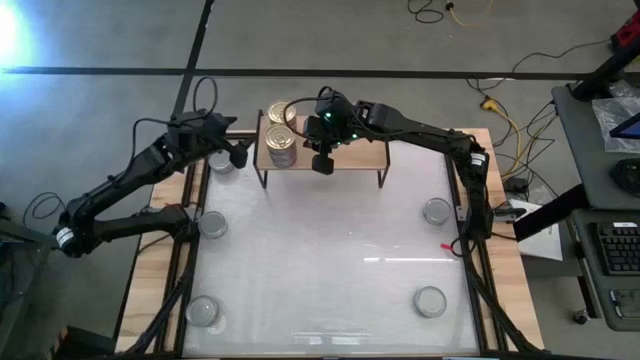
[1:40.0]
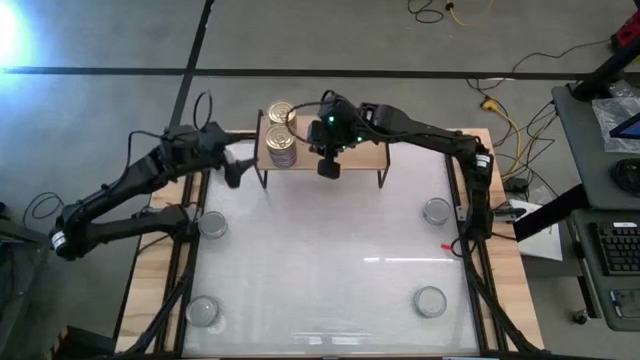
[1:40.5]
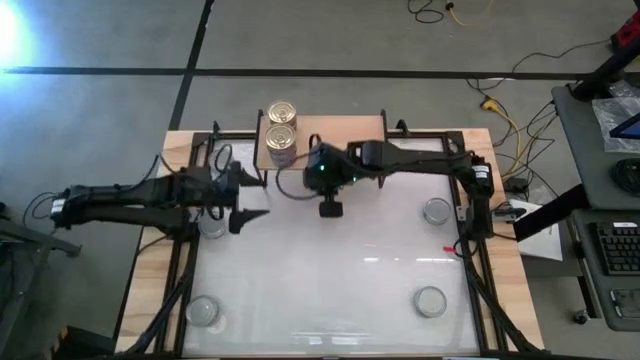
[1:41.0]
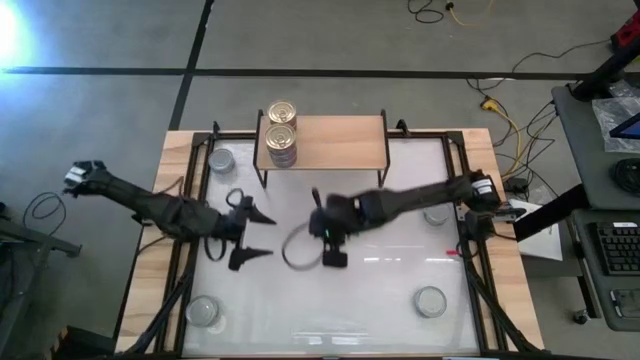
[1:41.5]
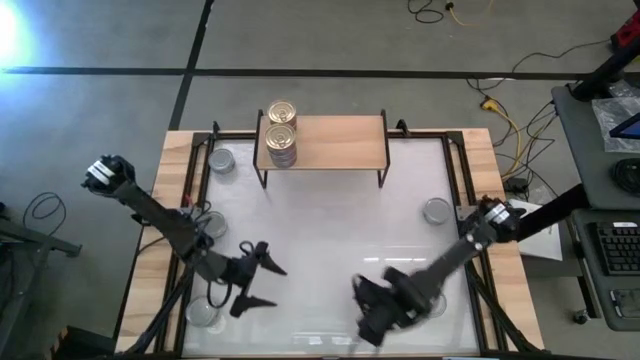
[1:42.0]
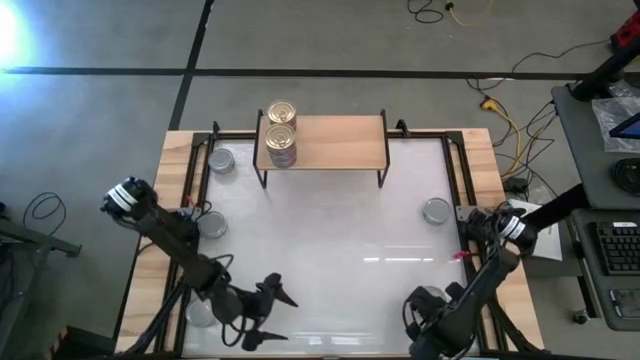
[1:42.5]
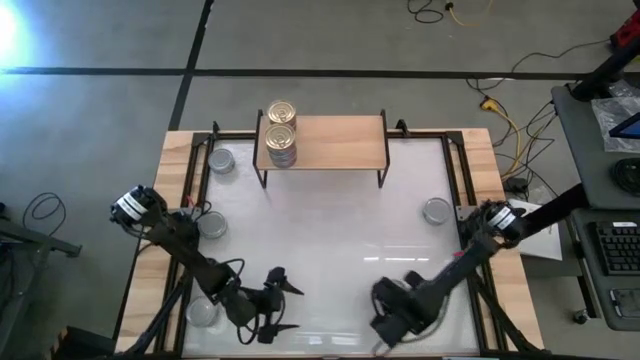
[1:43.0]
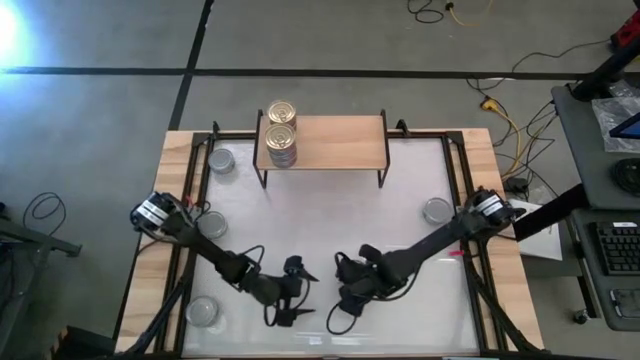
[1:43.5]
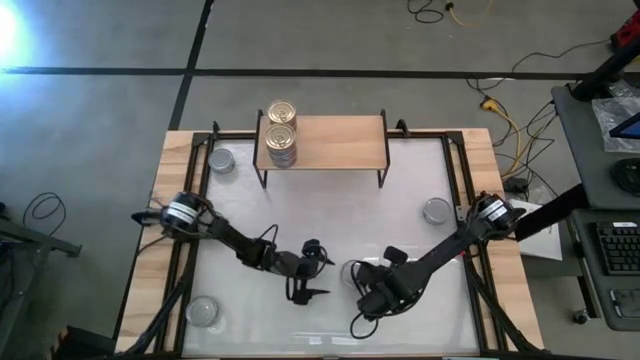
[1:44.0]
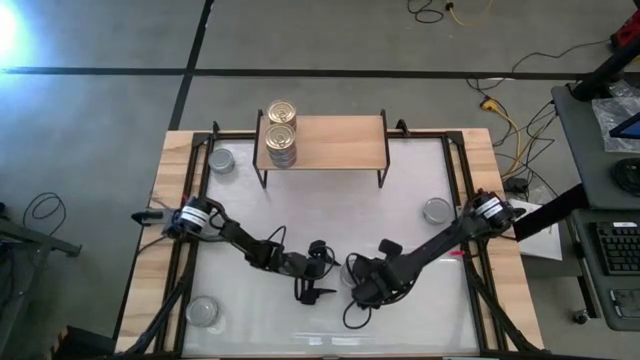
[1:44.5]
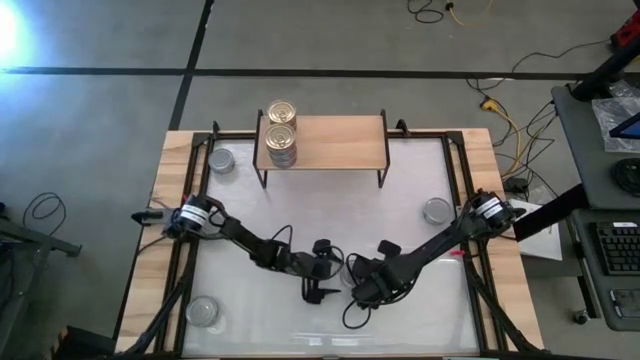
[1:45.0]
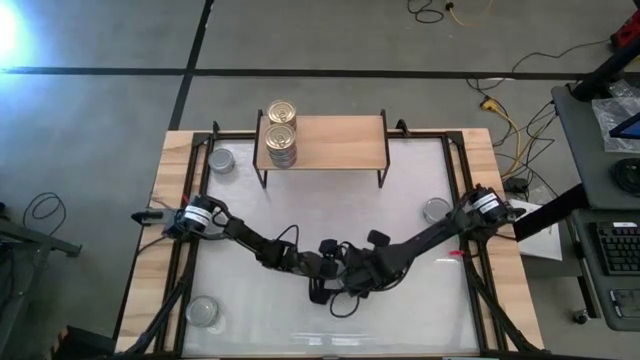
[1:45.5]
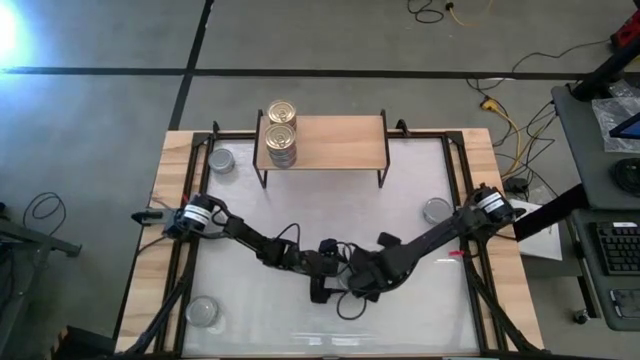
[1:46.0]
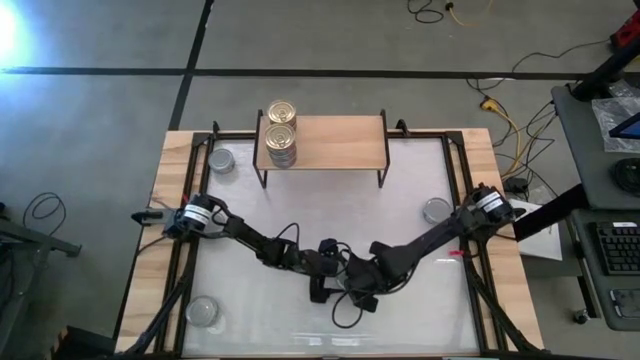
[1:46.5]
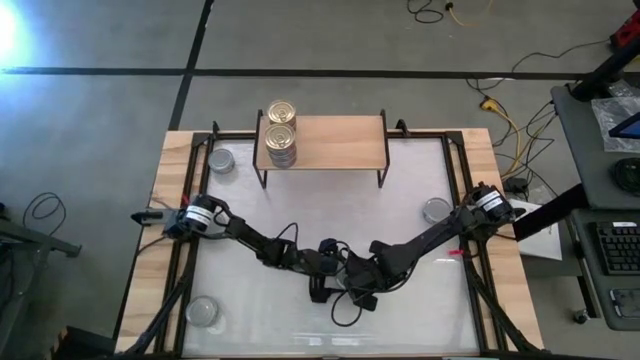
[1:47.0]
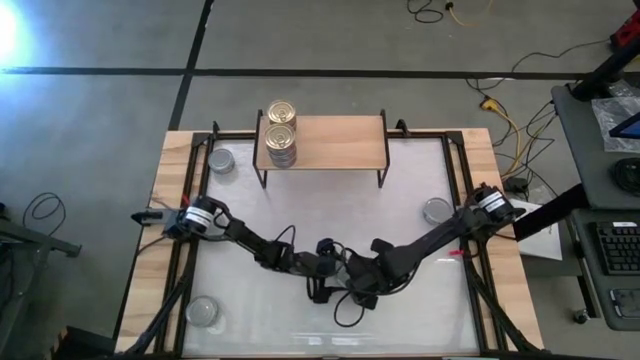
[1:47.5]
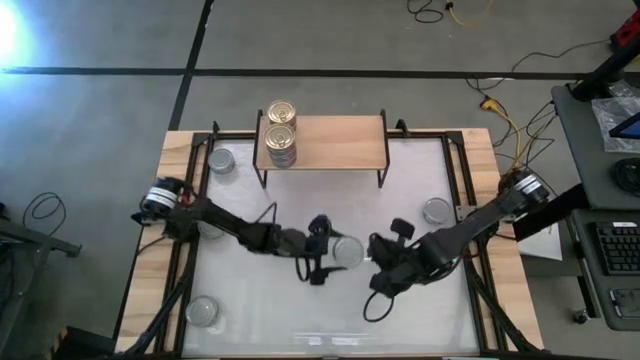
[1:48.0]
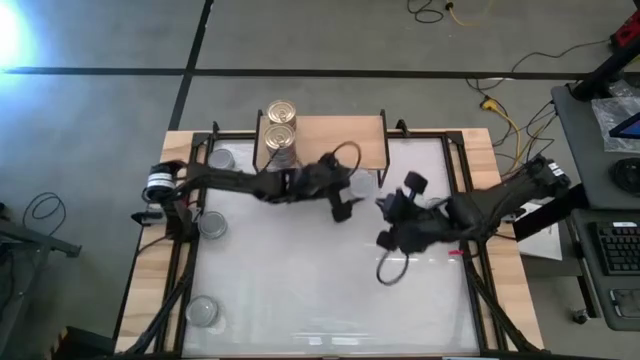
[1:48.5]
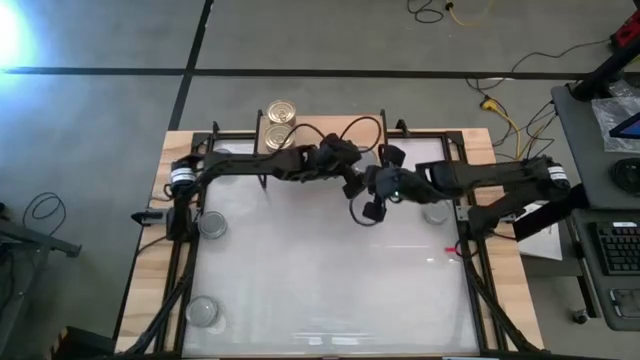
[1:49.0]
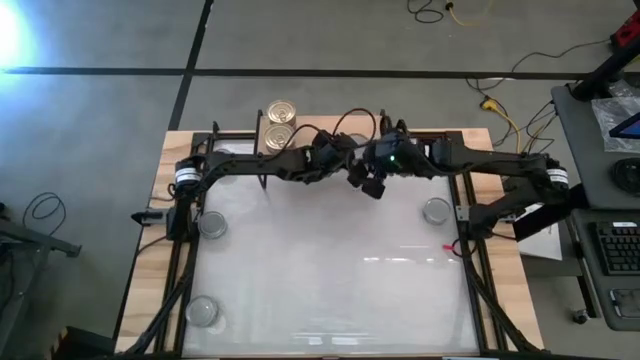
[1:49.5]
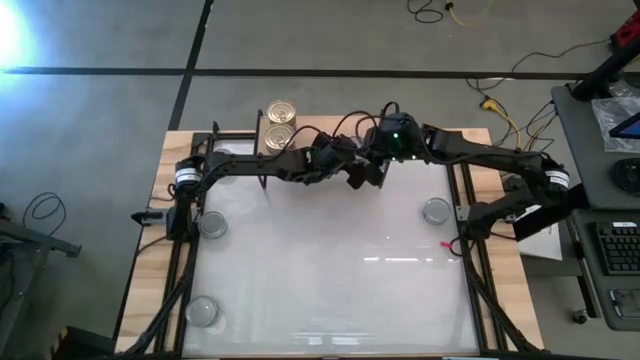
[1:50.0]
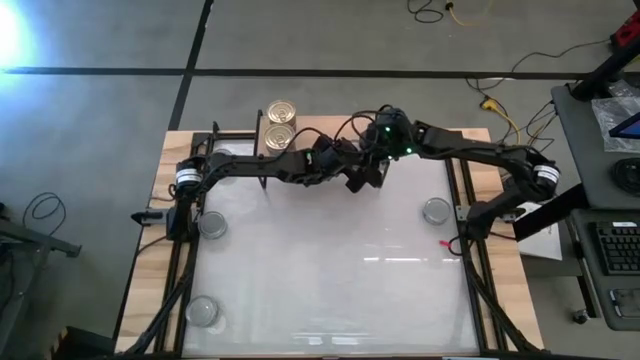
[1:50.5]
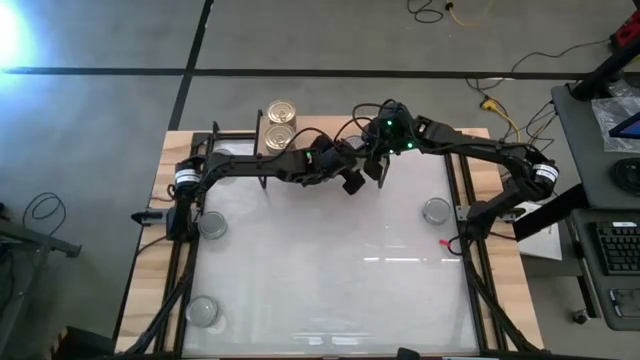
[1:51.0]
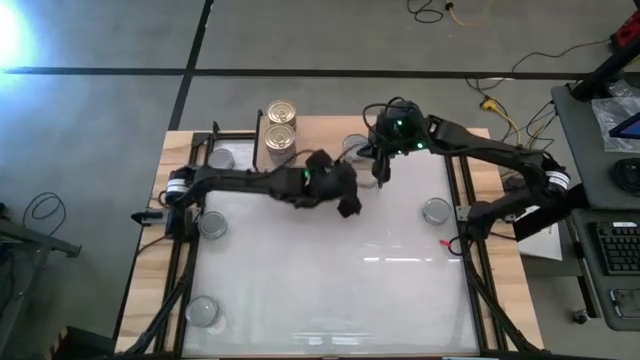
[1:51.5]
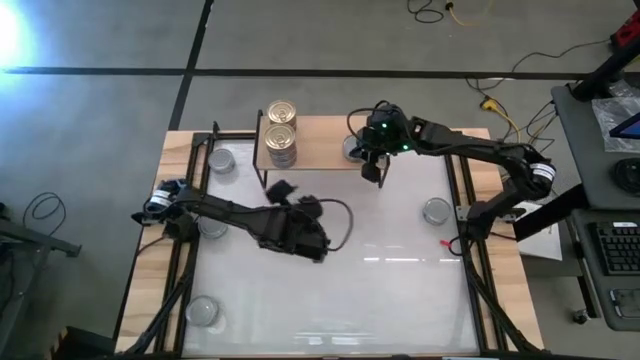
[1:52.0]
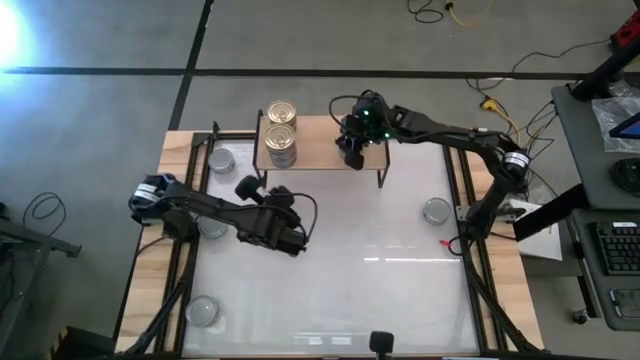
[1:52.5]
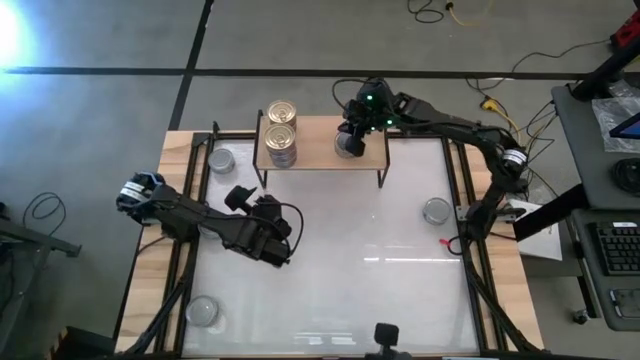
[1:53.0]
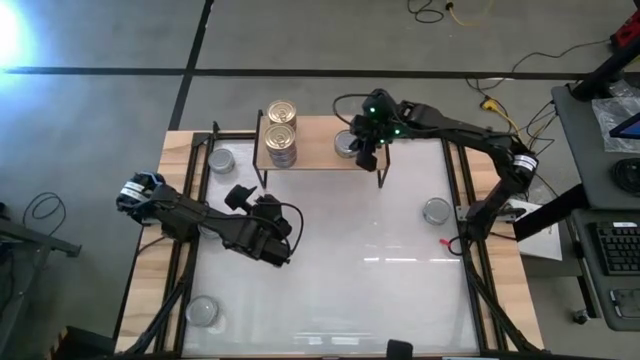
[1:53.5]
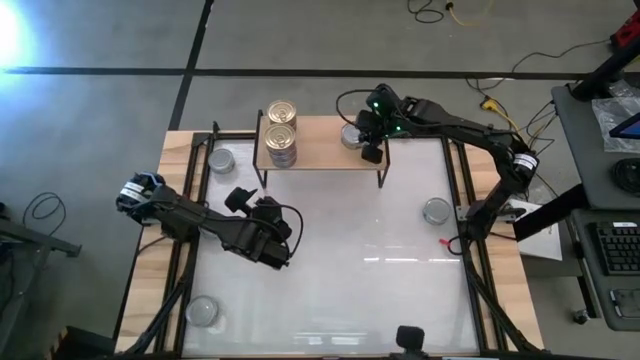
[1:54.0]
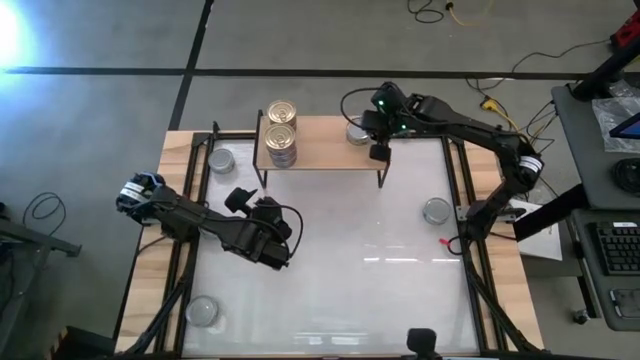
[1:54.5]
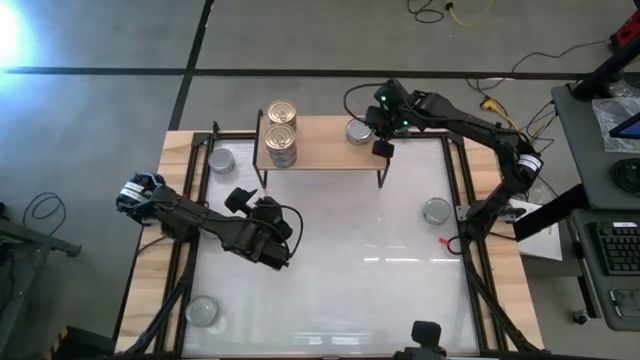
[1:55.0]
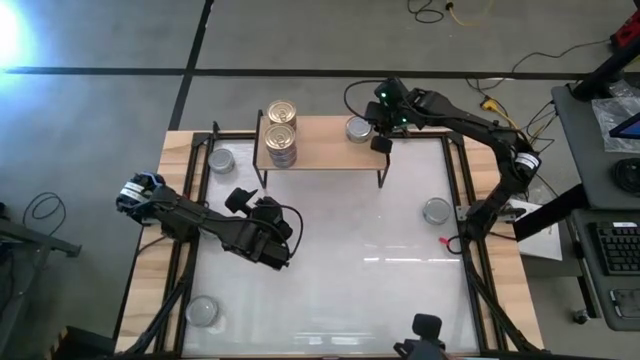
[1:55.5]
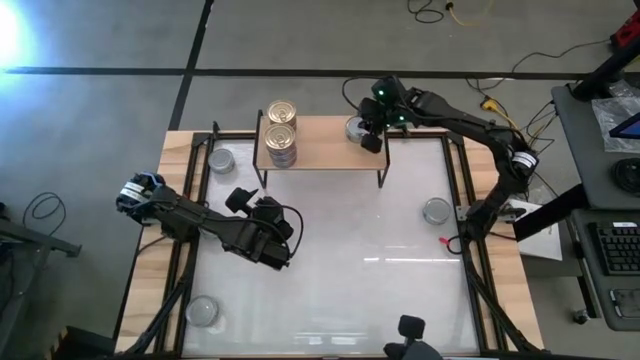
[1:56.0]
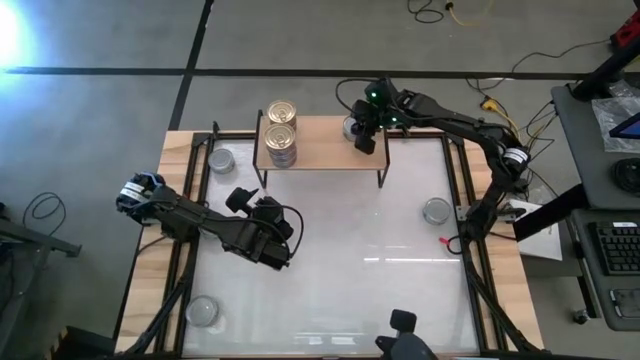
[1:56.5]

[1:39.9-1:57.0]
Task: Stack canned seafood by type on shelf
Put the green tuna can on the shelf

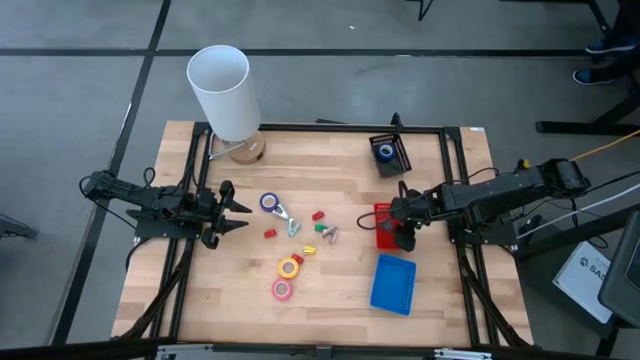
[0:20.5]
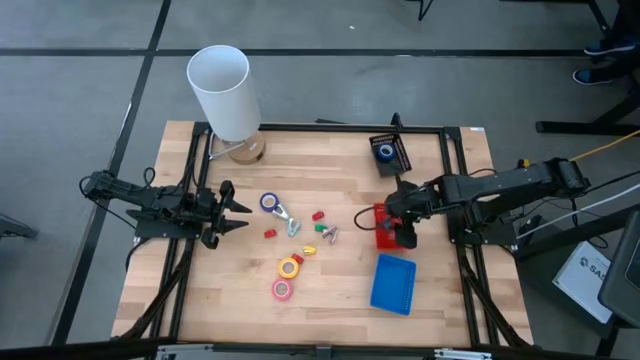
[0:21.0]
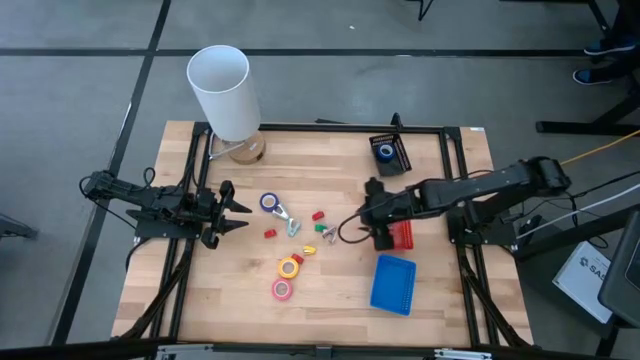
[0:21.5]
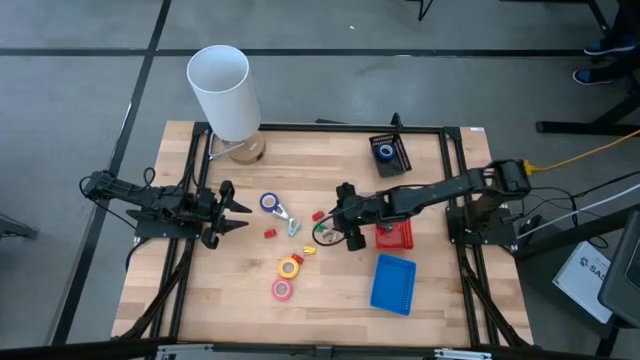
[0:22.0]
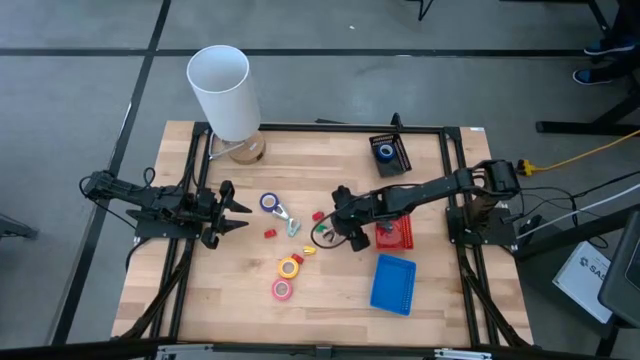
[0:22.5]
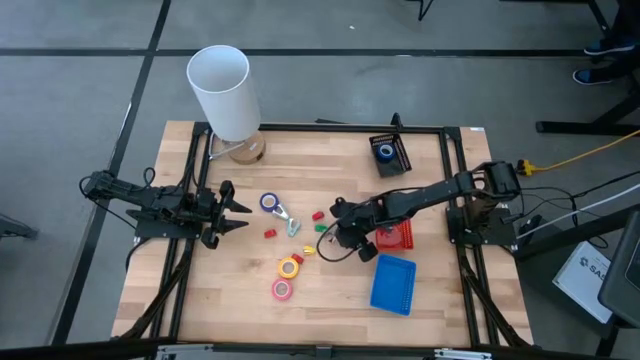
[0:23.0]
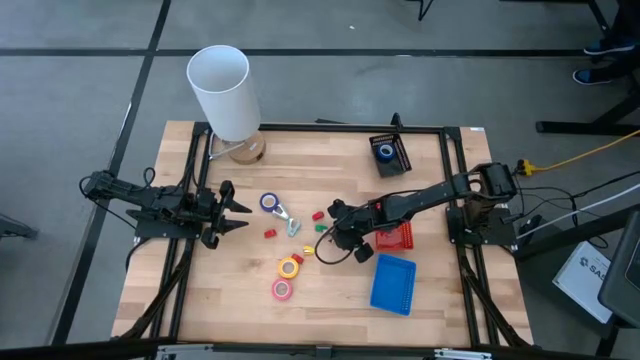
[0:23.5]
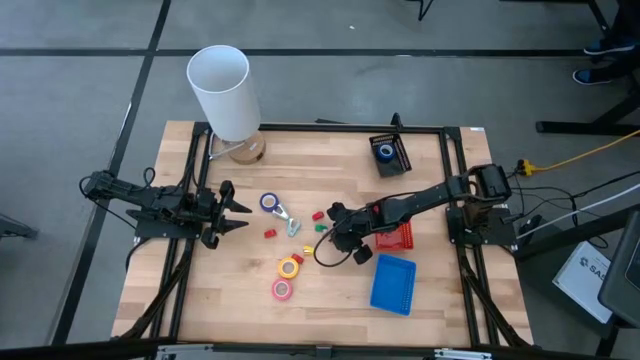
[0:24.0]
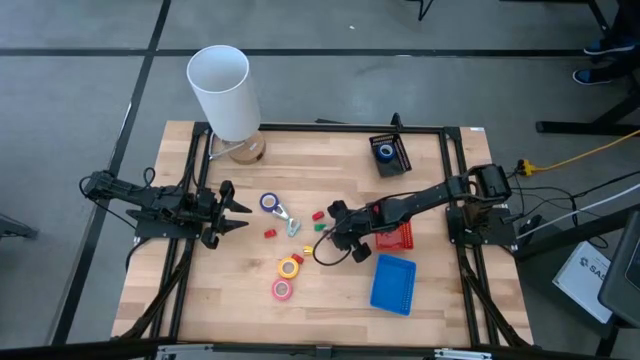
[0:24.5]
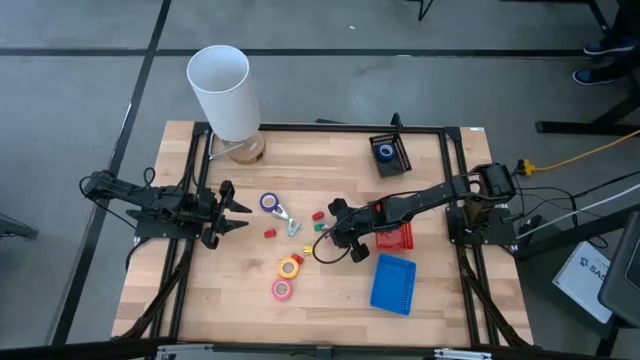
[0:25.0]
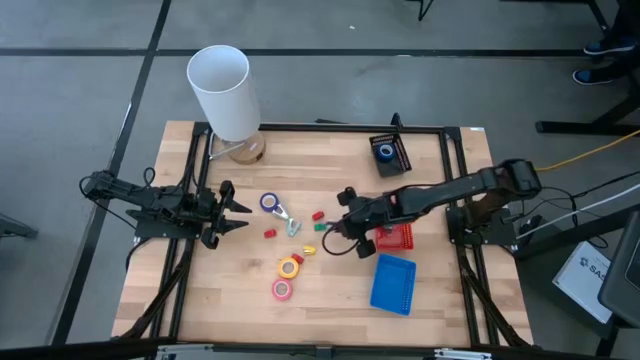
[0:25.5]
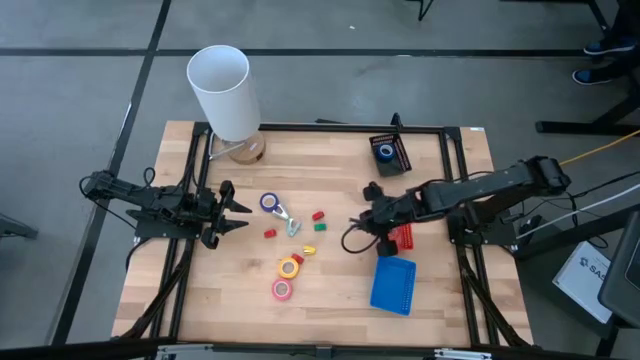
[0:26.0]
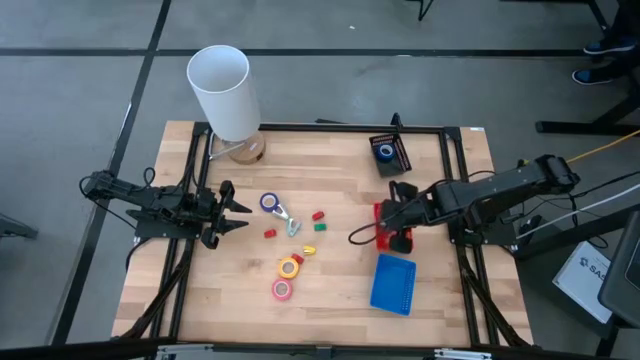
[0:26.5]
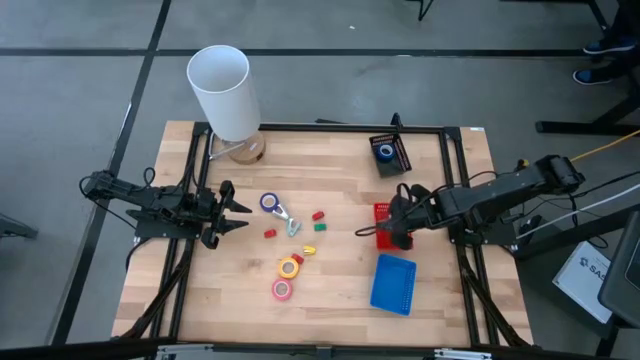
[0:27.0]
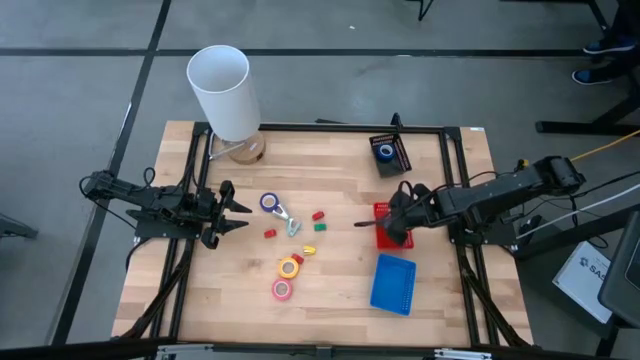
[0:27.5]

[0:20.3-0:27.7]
Task: Pick and place Stapler, Stapler remover, tape
Put the pink staple remover into the red basket
